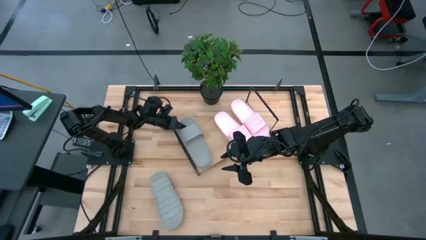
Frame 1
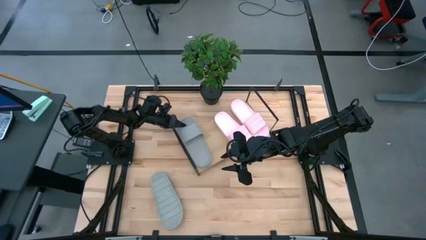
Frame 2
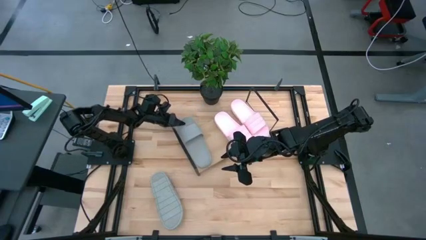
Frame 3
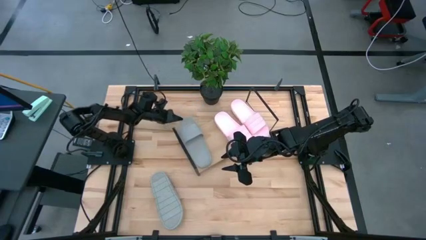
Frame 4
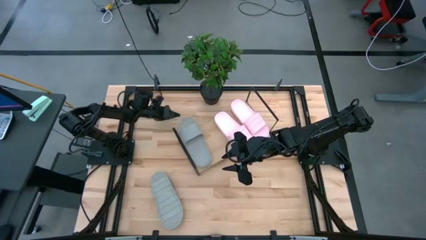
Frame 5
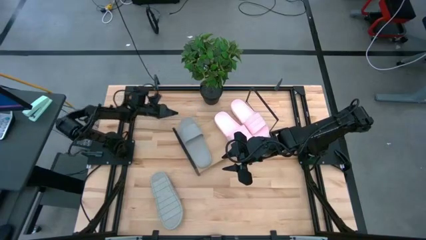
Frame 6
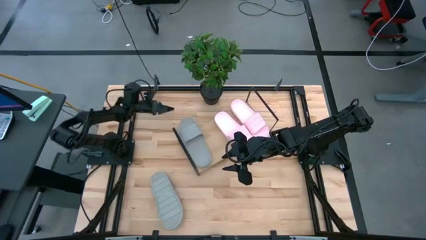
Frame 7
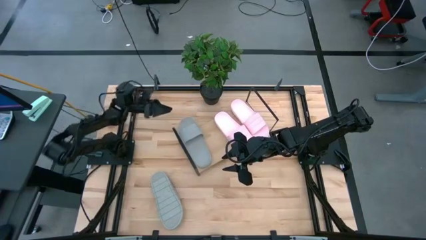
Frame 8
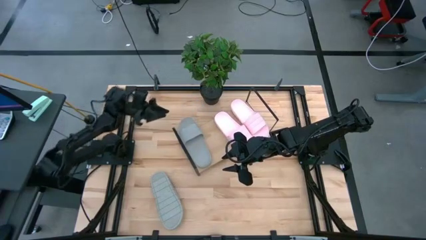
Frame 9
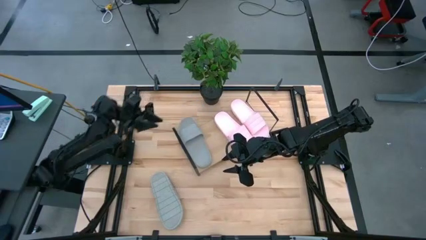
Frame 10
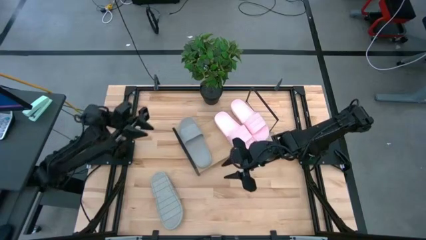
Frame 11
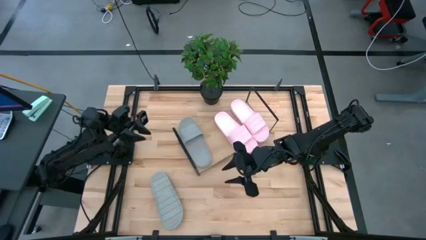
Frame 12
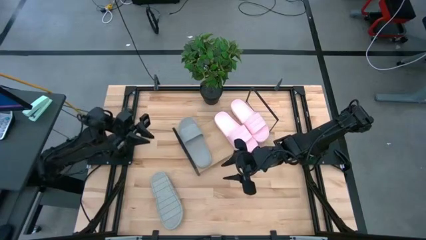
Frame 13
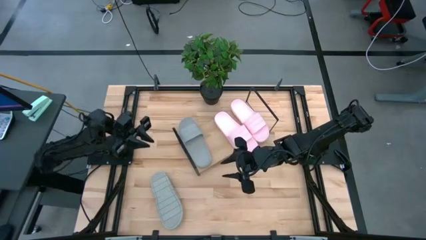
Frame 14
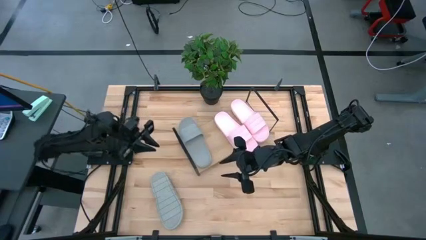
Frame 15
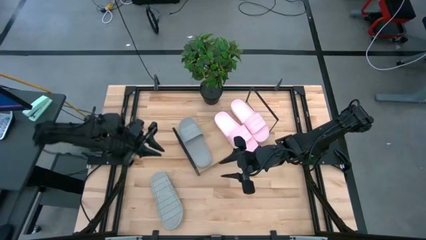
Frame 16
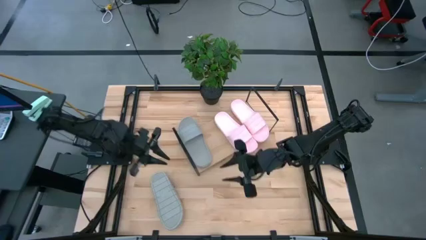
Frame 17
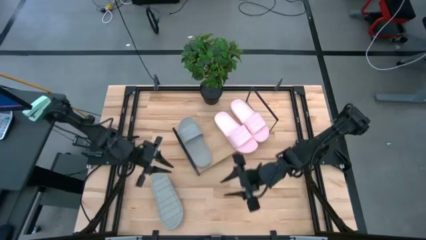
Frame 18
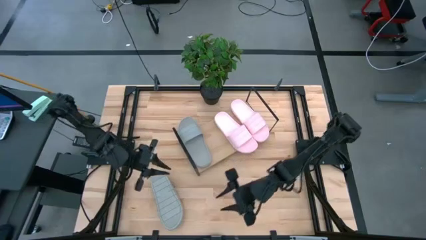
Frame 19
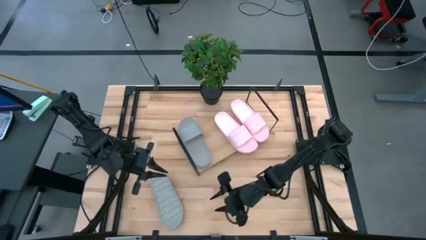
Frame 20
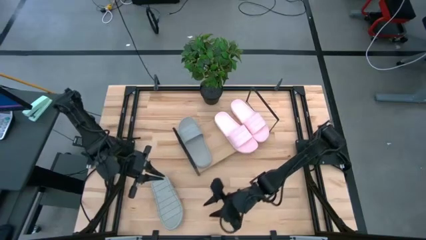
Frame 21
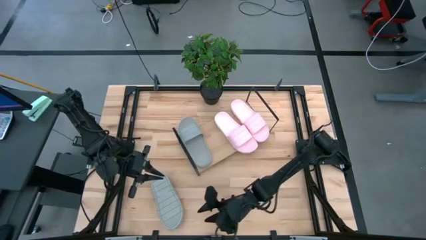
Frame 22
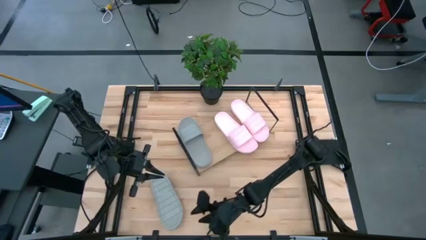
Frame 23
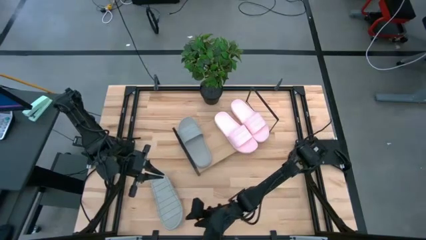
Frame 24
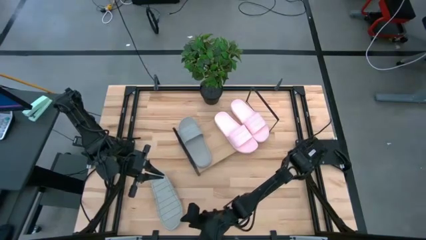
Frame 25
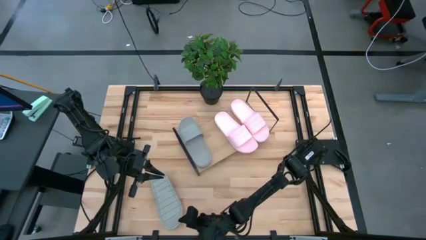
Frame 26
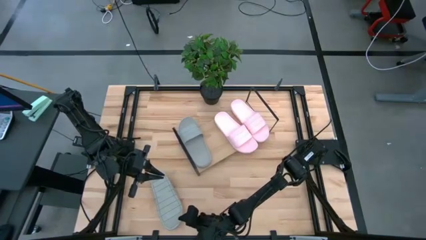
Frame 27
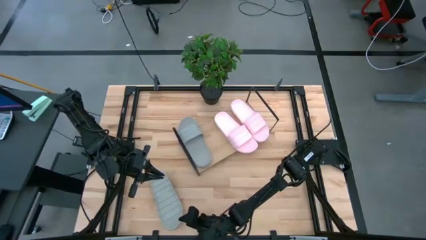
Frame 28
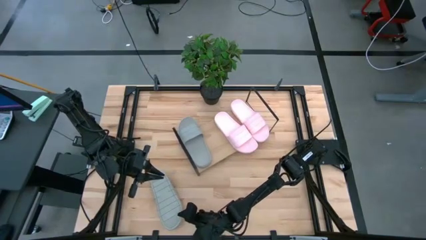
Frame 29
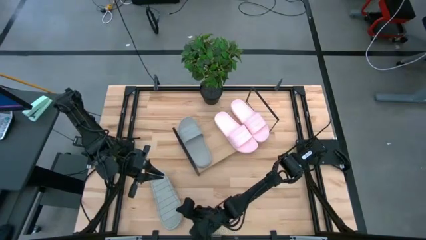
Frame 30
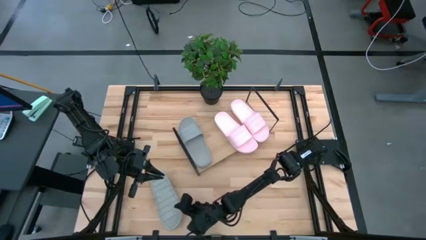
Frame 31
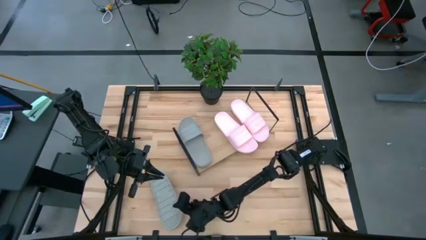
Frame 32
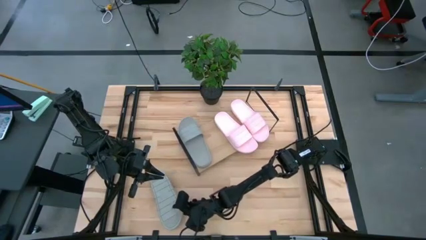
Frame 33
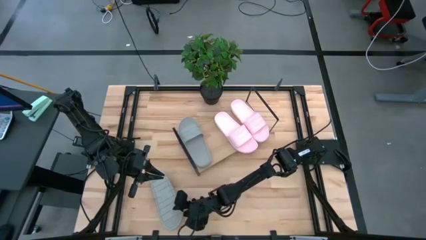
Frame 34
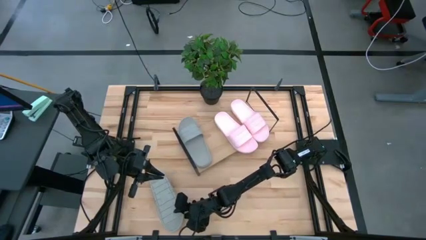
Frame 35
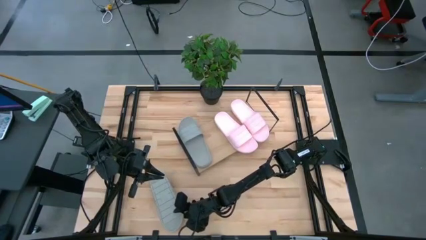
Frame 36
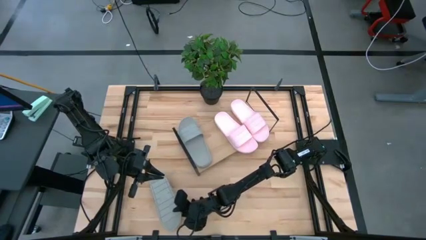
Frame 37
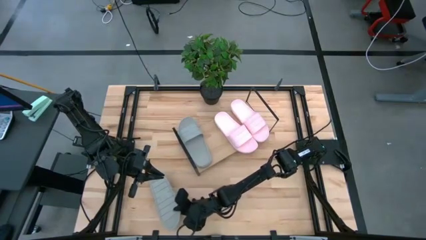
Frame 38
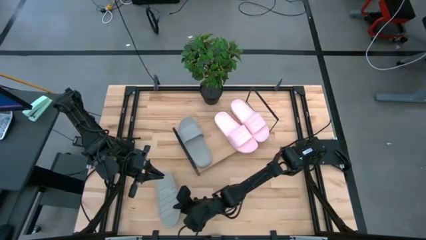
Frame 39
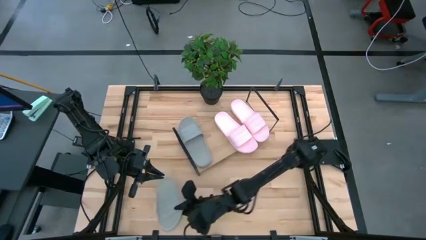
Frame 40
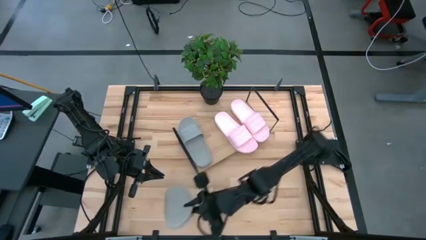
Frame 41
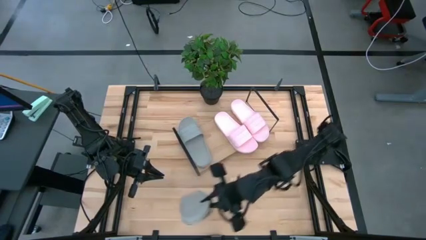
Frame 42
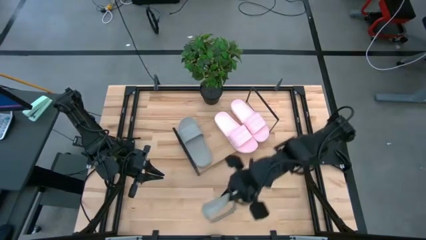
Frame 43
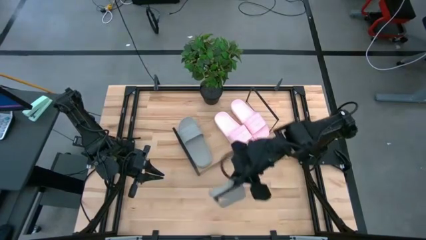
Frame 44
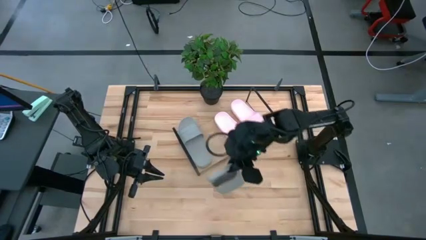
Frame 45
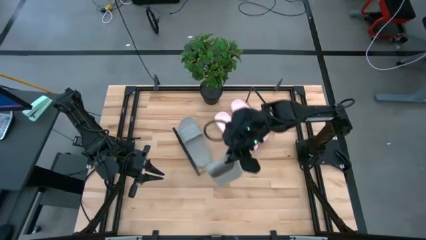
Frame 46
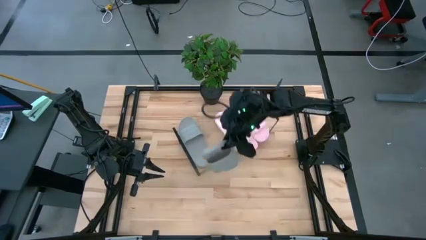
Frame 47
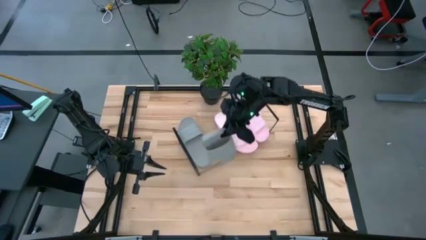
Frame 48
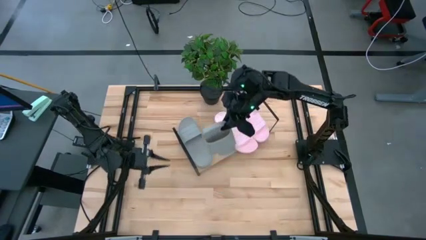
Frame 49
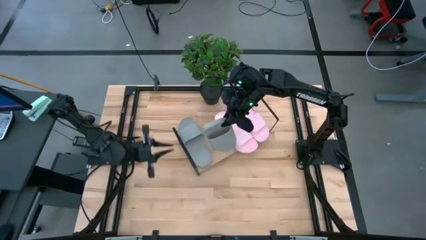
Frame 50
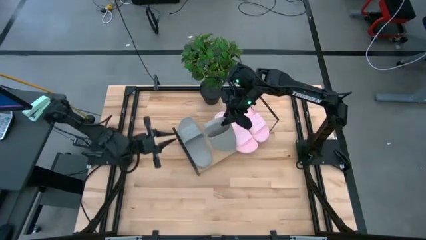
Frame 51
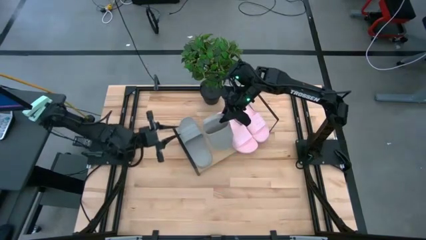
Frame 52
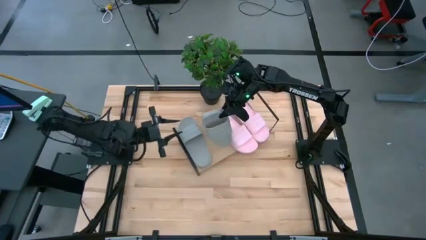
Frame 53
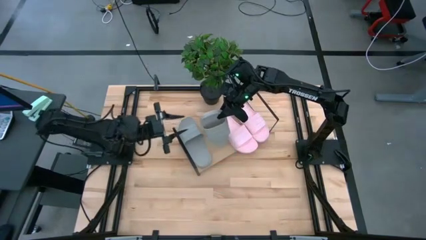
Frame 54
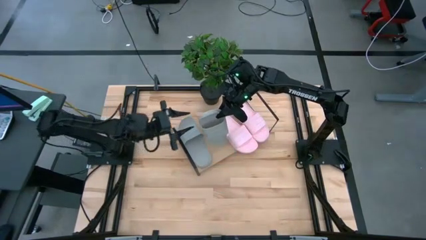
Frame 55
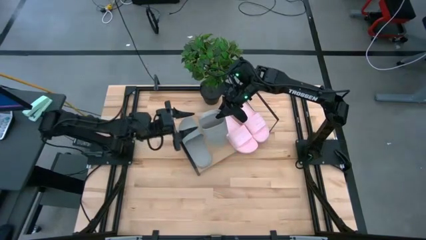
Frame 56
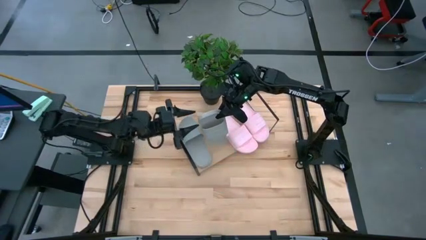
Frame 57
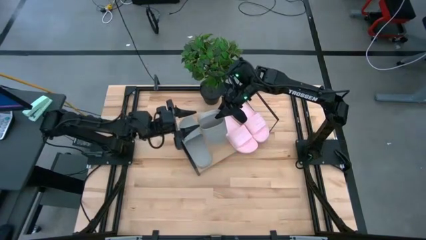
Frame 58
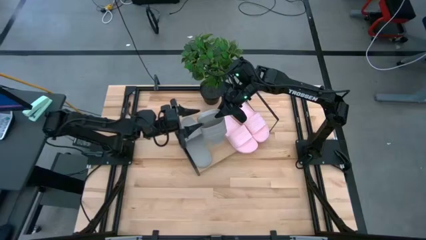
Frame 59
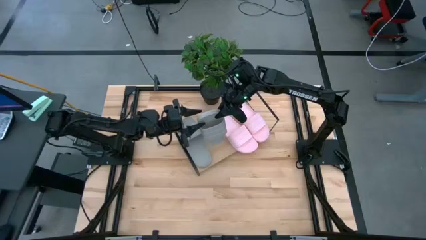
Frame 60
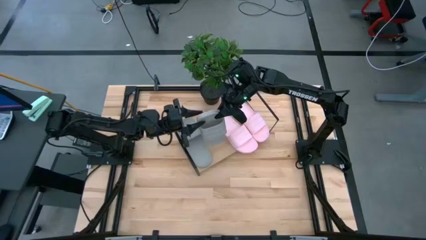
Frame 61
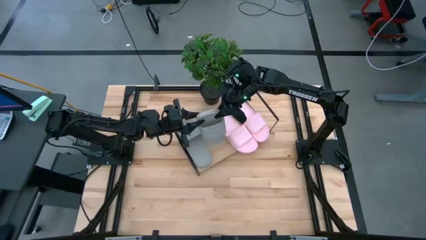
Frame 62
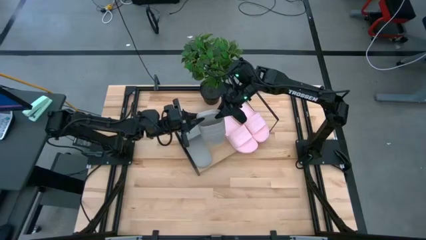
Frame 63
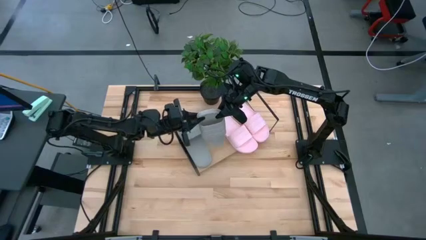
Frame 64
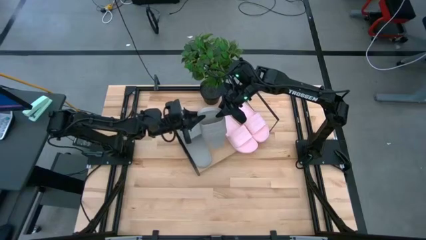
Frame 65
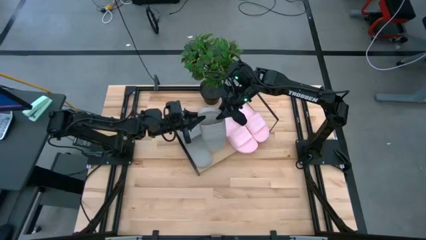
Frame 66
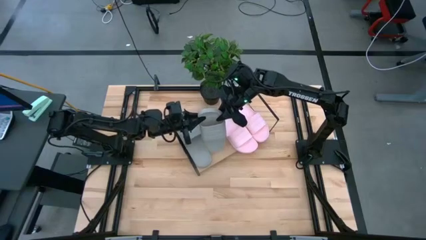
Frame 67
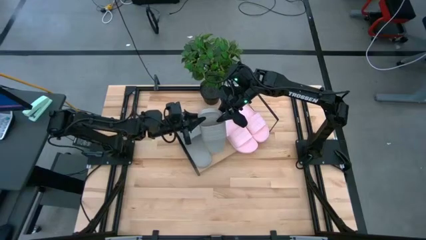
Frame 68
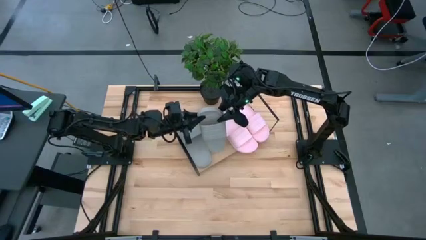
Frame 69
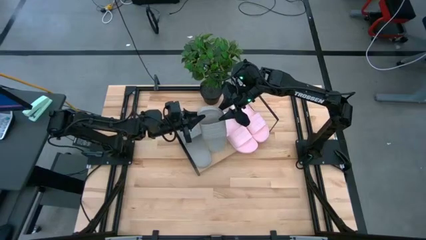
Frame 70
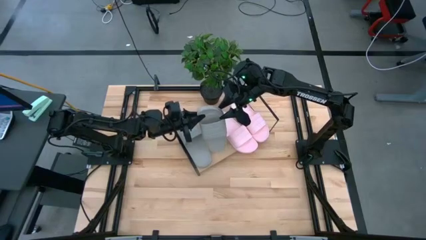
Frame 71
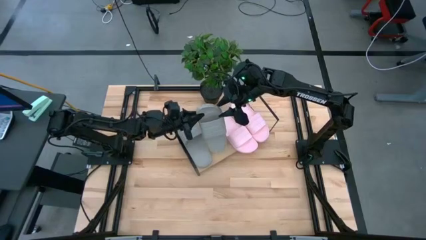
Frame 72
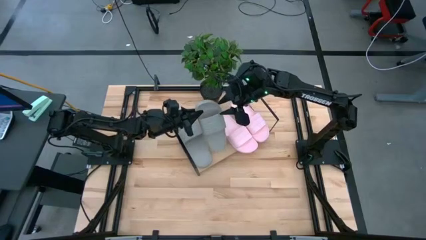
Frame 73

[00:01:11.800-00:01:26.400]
Task: Pick and place slides into the shelf
Put the gray slipper on the shelf

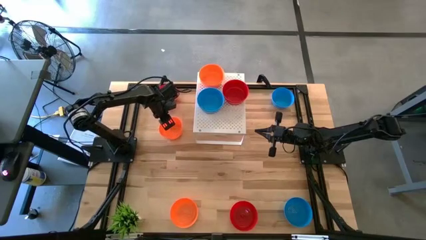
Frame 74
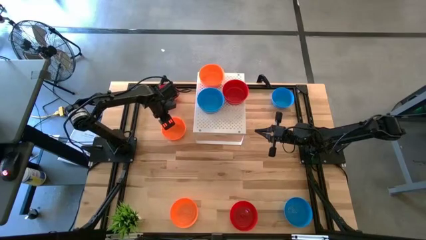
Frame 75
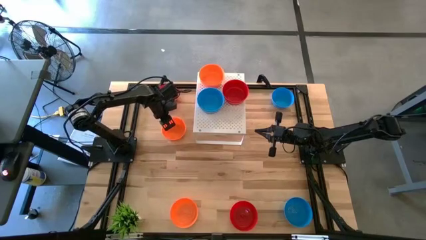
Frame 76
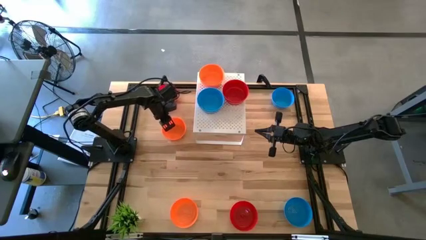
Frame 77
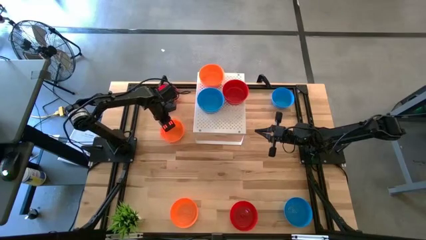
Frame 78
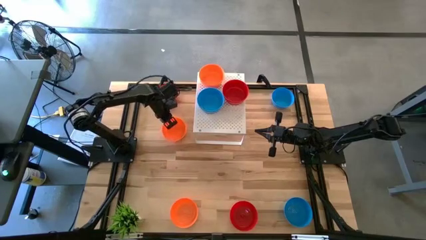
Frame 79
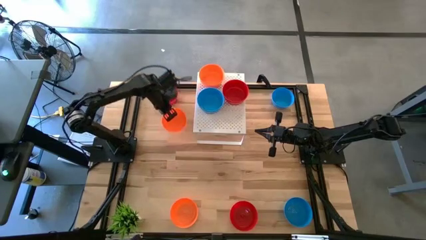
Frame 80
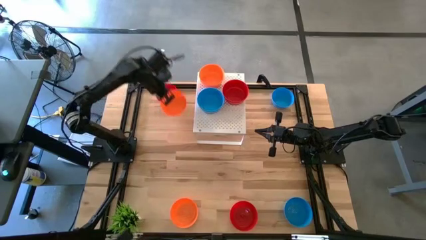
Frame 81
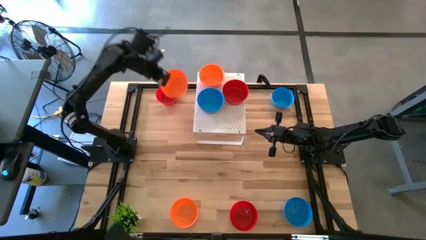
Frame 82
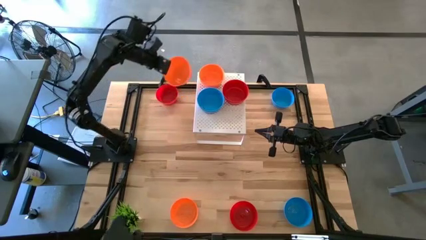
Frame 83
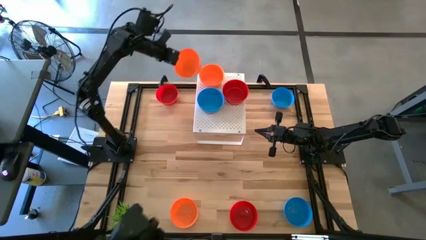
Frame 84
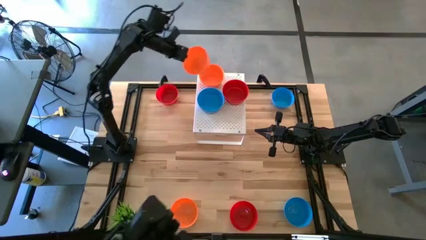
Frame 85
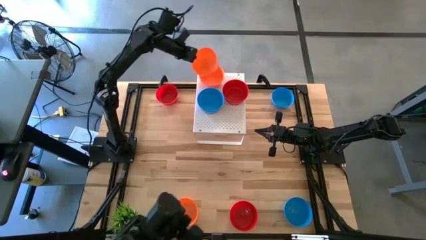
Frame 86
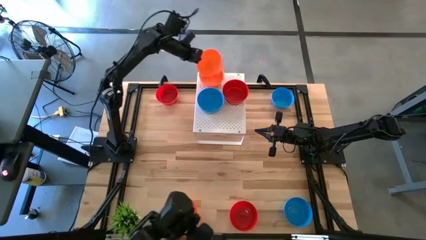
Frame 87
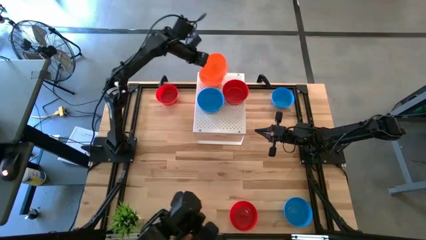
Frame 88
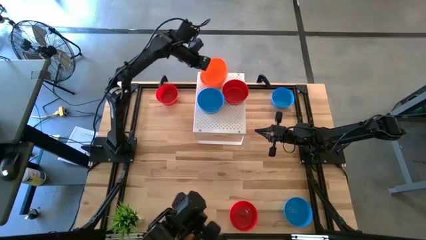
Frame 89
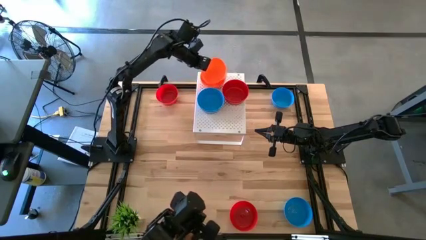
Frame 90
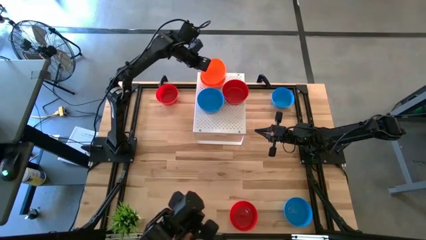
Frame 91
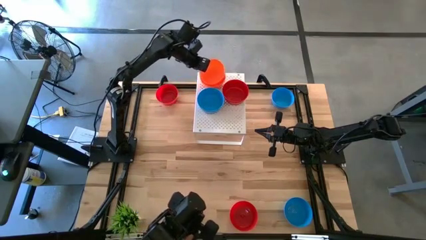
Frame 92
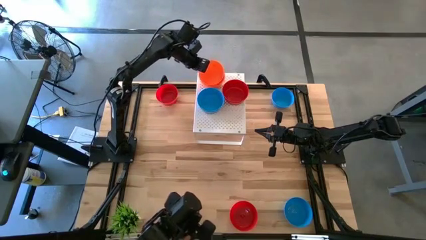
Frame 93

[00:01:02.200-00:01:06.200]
Task: Pick & Place Mini bowls
Stack the orange bowl on top of the orange bowls on the shelf
